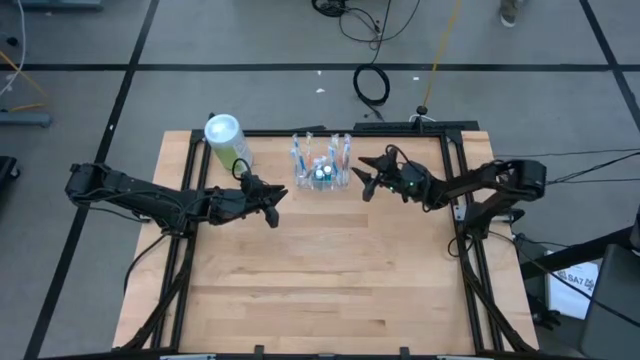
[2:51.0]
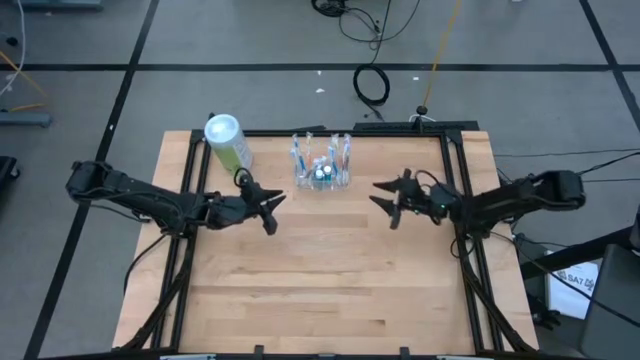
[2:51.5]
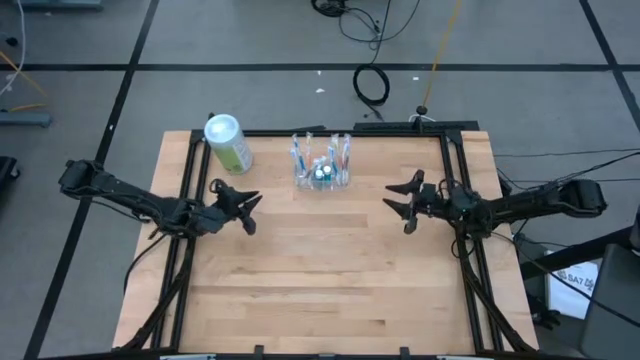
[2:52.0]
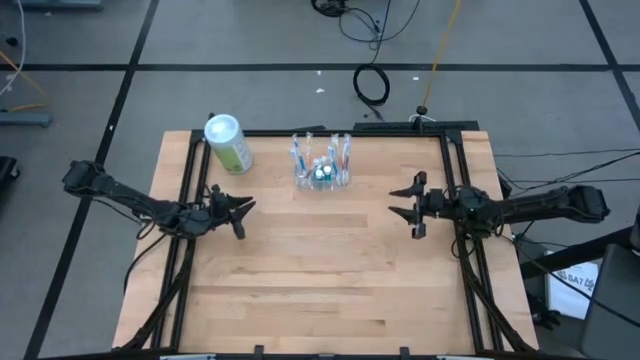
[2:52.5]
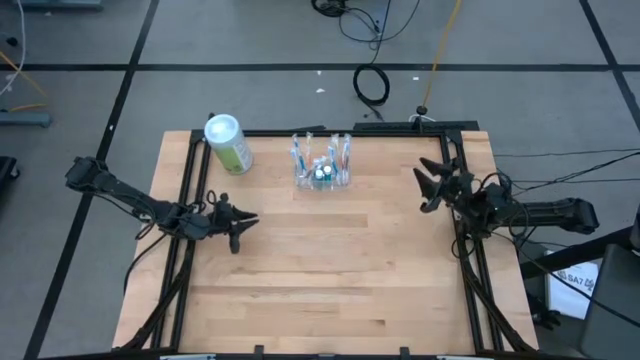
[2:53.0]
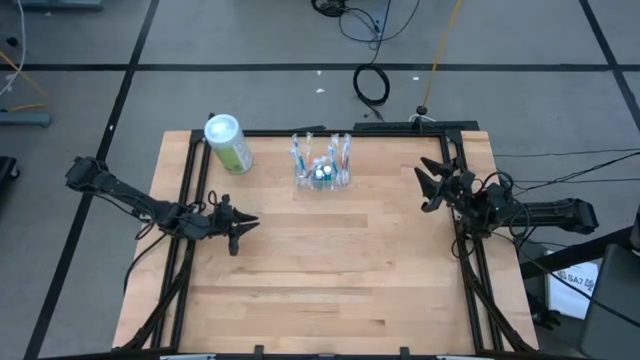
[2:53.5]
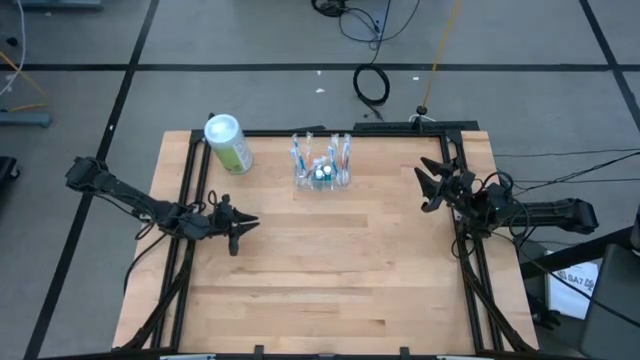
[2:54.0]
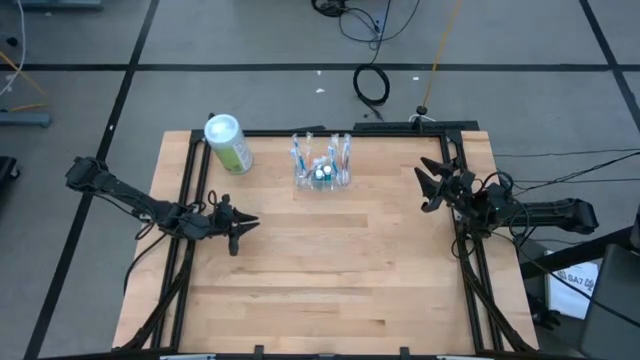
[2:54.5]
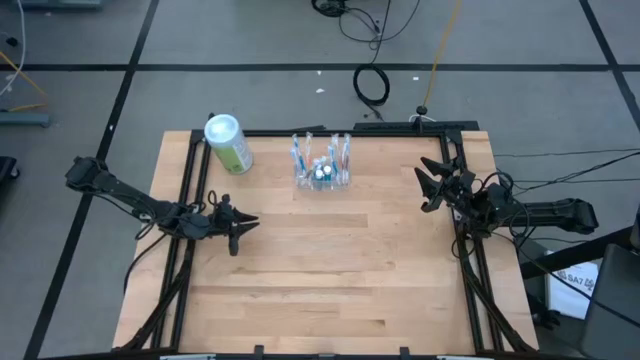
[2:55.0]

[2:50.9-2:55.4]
Task: Pick & Place toothbrushing station
Return to Home Position

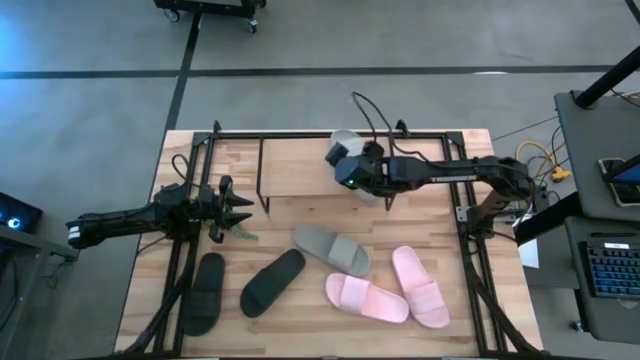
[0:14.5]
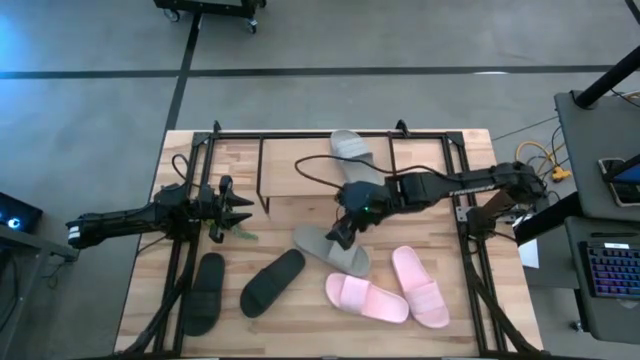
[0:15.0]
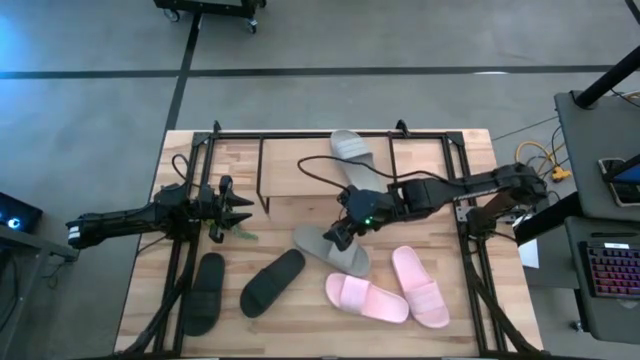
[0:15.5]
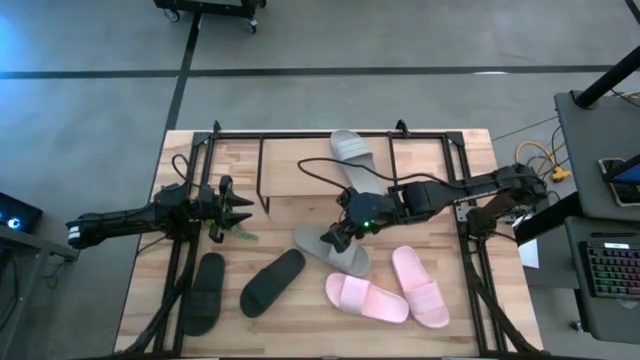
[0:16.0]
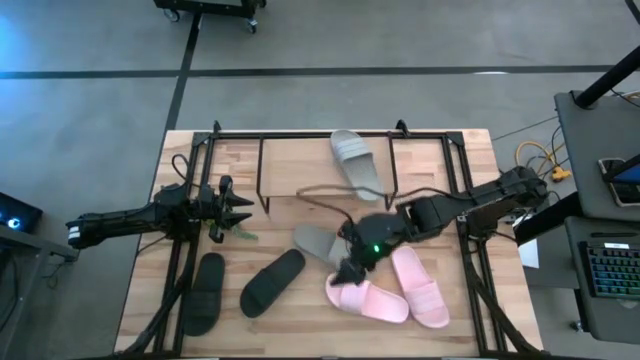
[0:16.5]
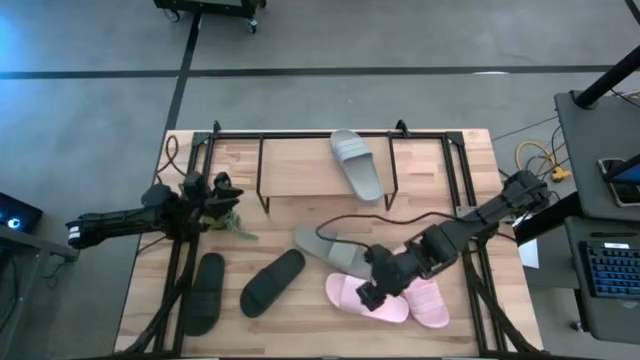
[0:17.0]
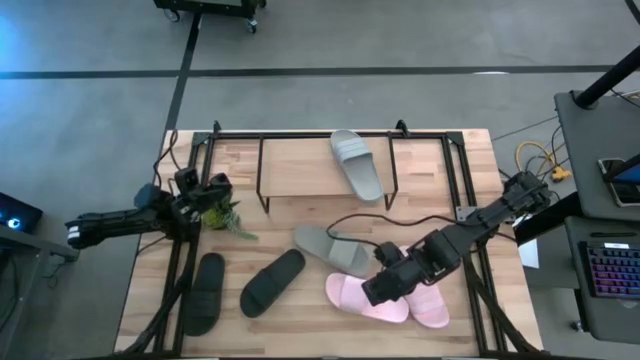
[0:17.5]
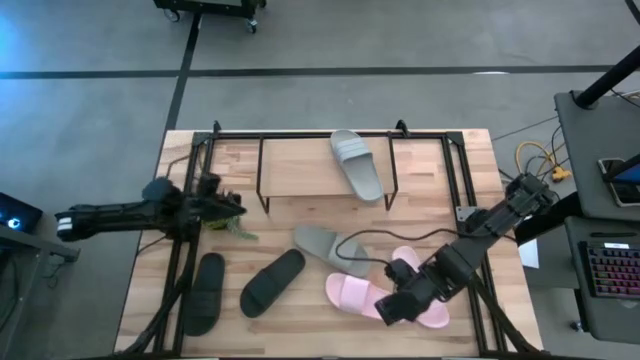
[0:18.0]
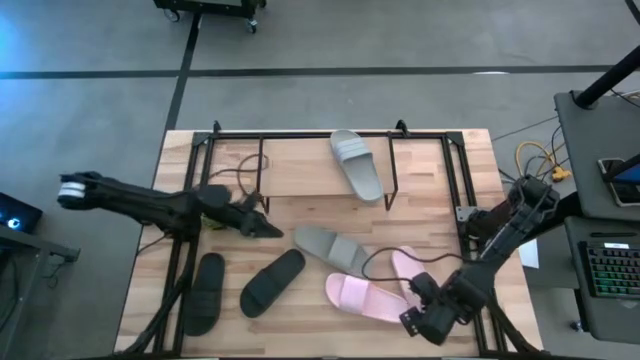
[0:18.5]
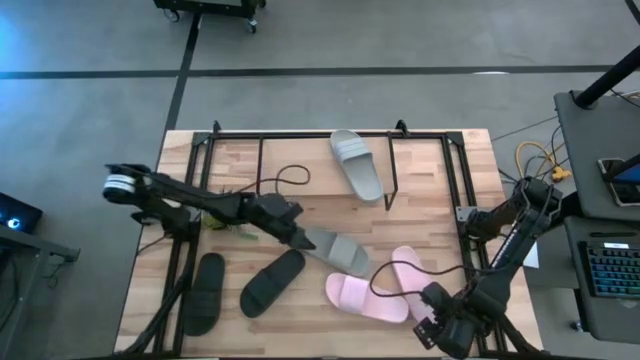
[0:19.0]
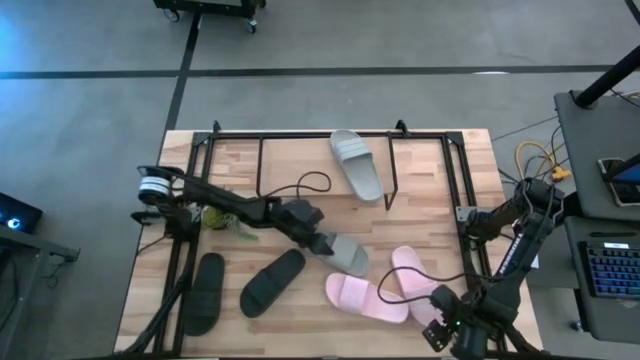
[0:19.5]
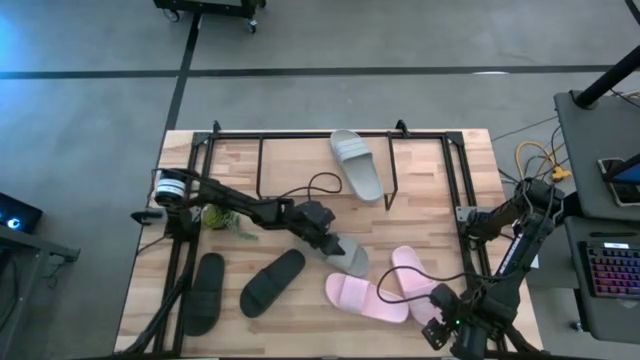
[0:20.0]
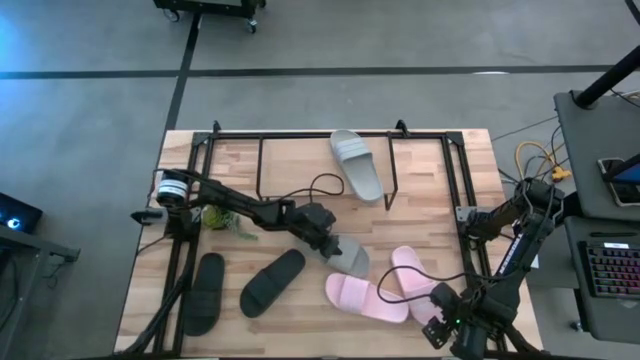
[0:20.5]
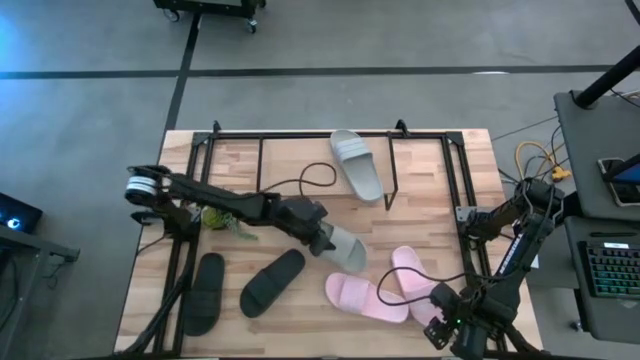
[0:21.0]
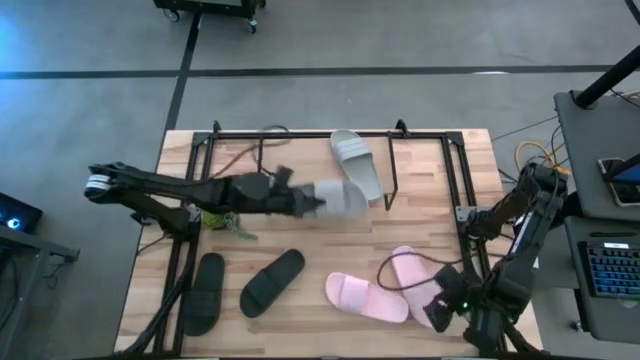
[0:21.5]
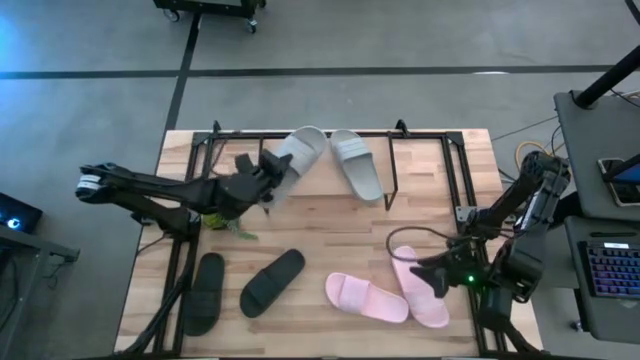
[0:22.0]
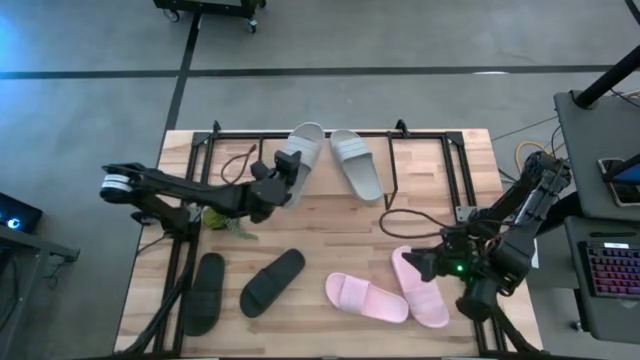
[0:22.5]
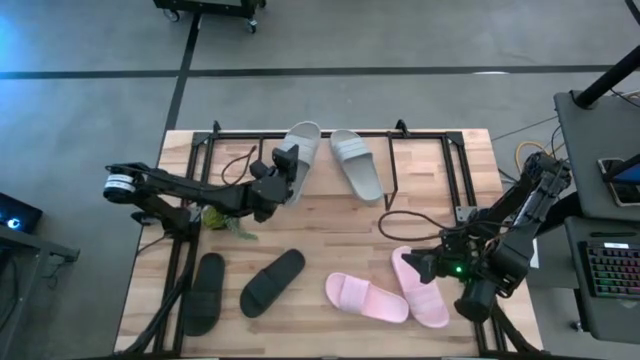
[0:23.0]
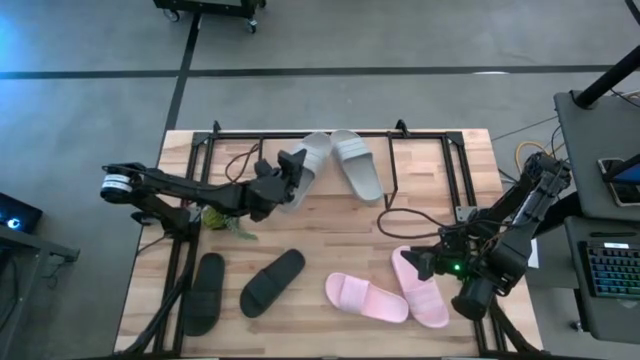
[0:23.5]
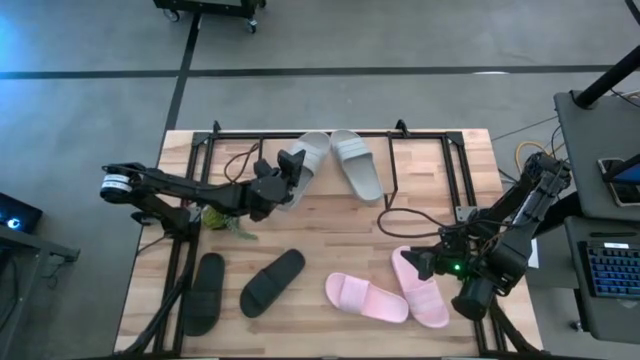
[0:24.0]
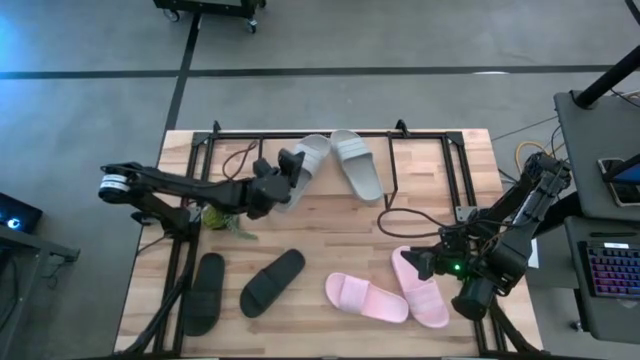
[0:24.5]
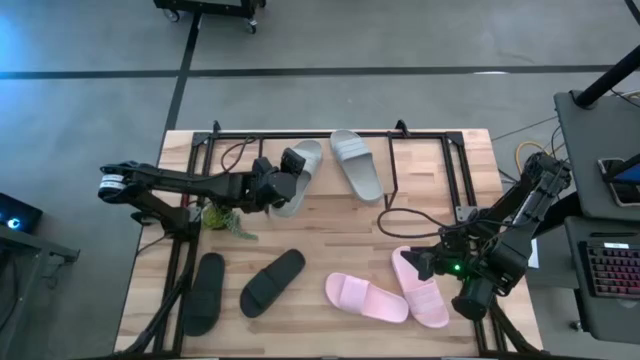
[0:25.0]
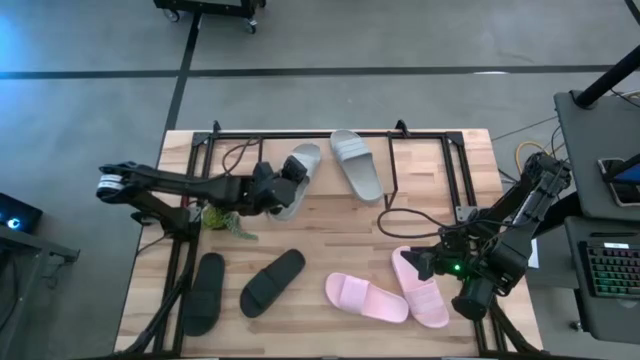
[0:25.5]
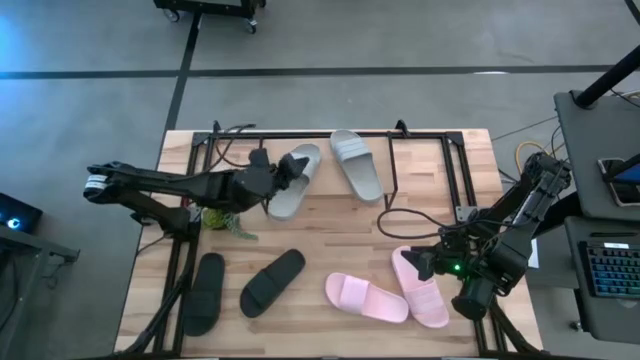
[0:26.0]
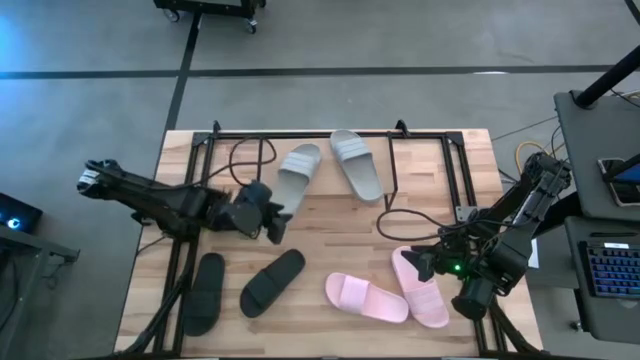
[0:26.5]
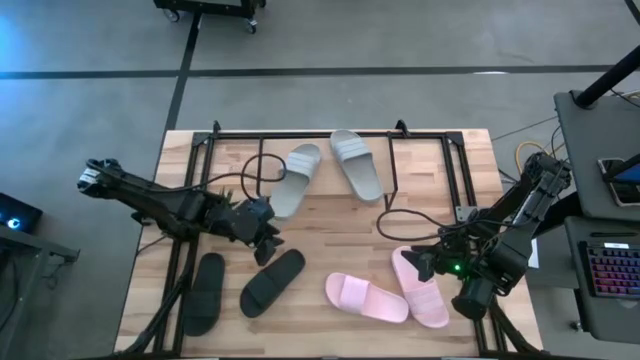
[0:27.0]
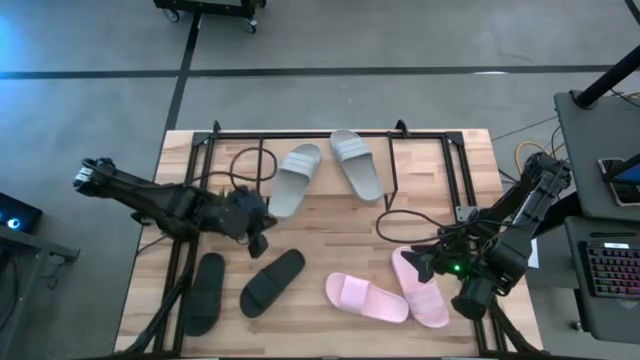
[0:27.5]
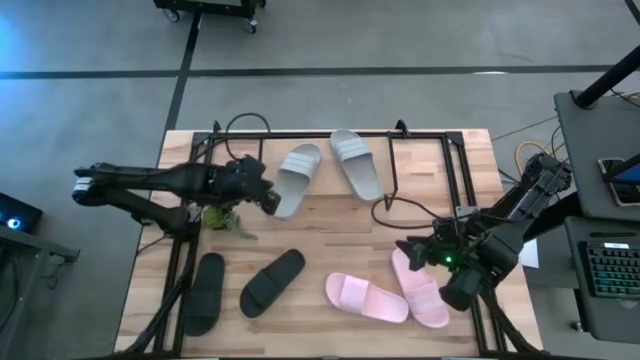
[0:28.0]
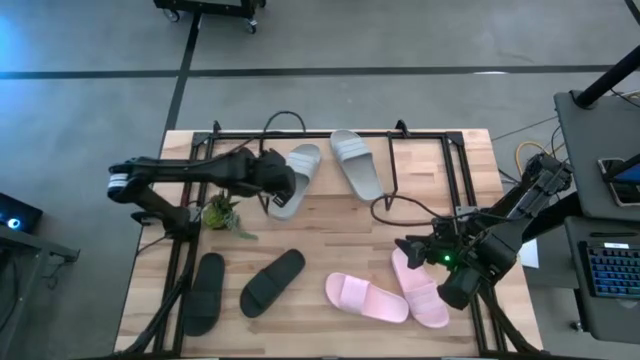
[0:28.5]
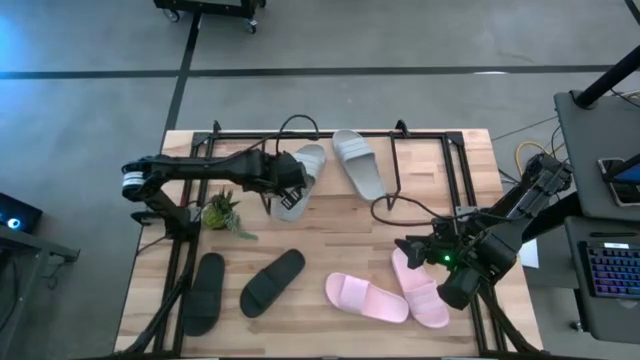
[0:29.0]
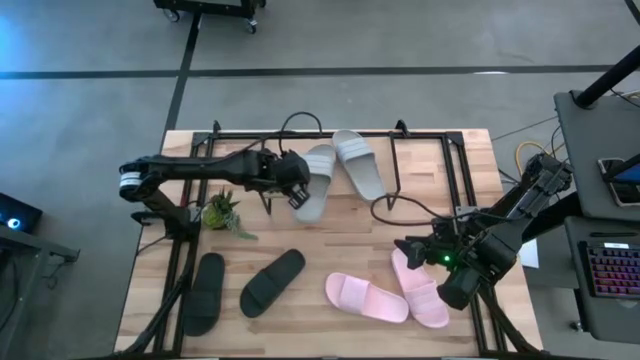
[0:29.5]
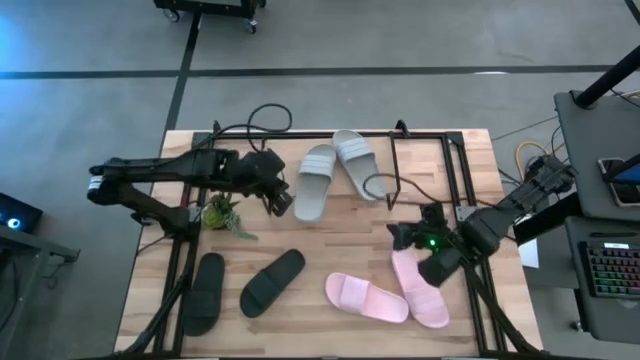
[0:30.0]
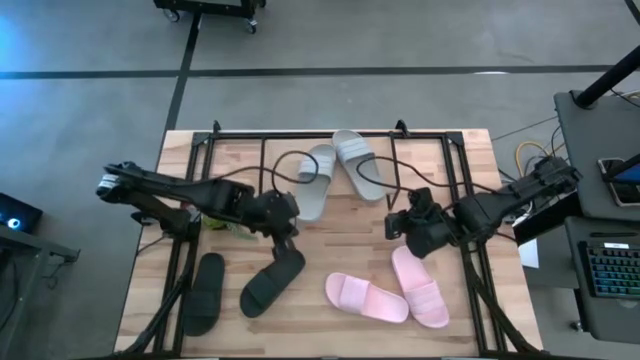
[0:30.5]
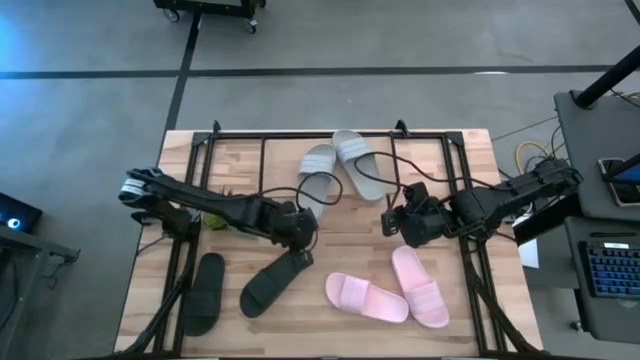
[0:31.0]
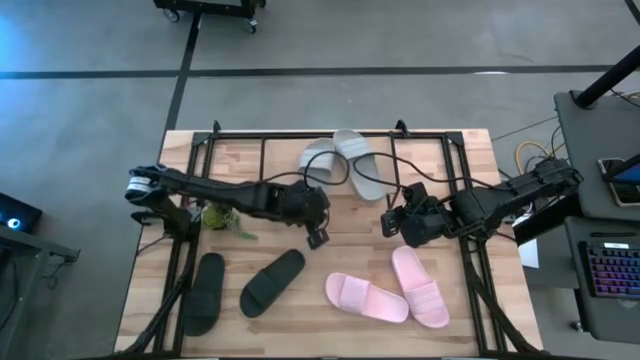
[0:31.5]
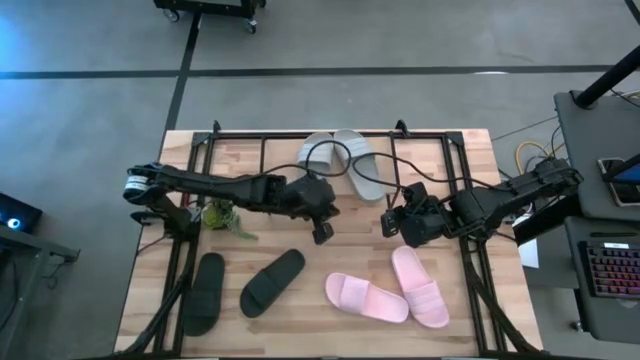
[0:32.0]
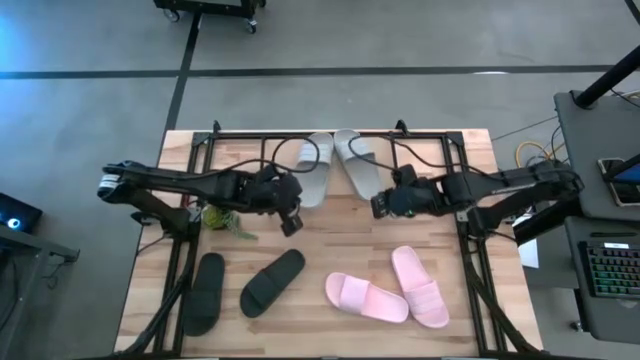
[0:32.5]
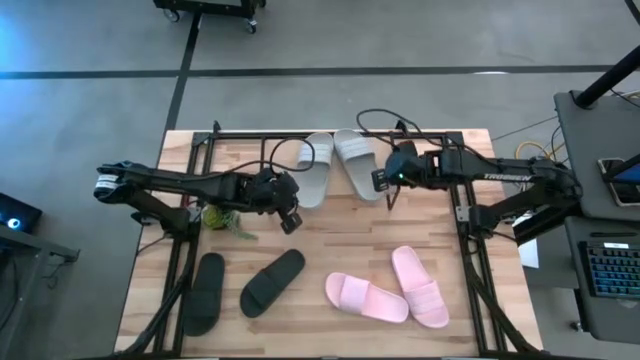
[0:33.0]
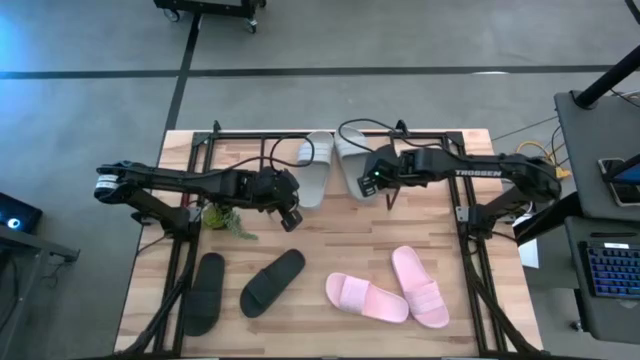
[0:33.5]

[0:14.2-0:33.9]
Task: Pick and place slides into the shelf
Put the gray slide on the shelf
